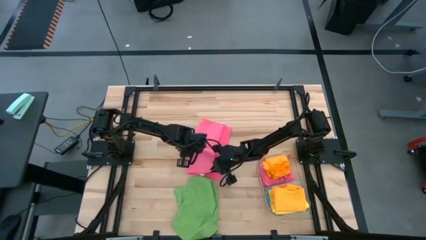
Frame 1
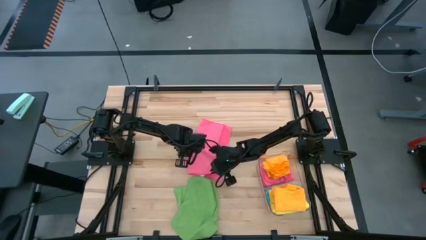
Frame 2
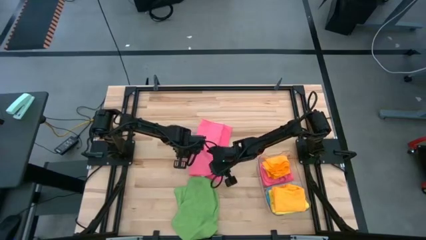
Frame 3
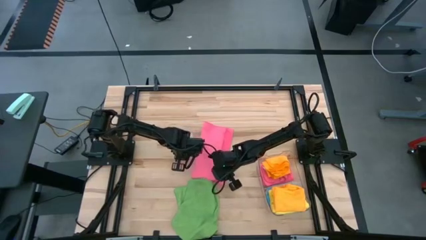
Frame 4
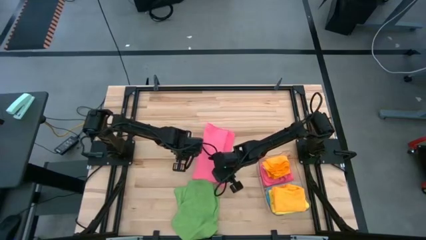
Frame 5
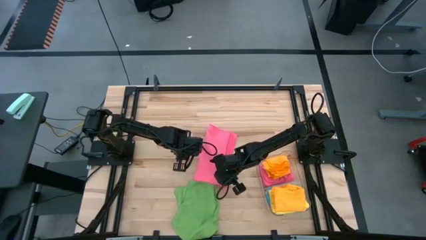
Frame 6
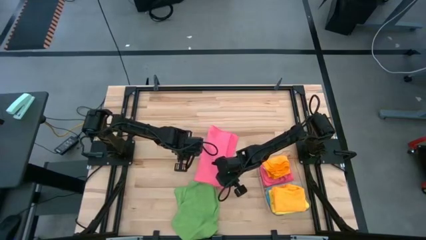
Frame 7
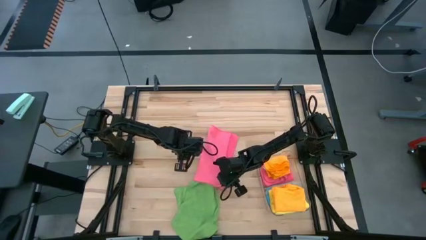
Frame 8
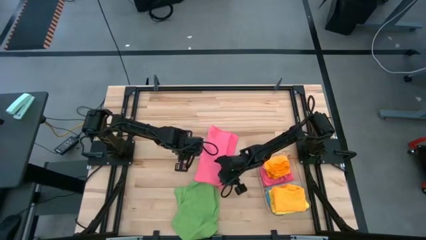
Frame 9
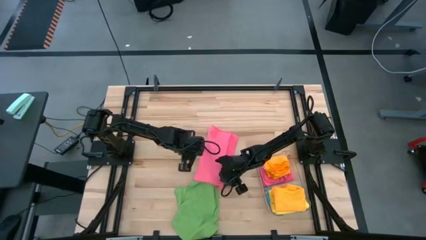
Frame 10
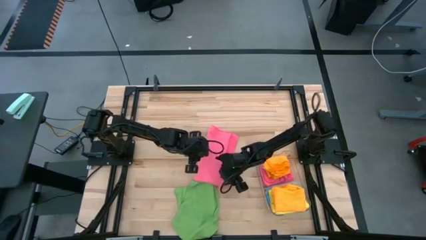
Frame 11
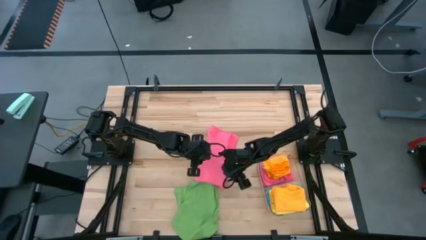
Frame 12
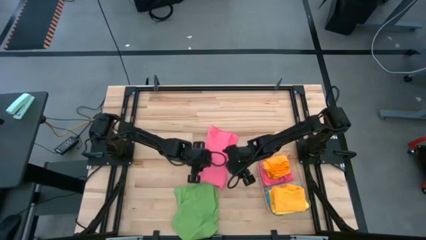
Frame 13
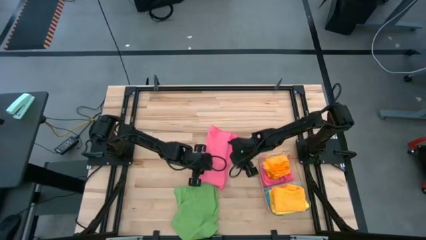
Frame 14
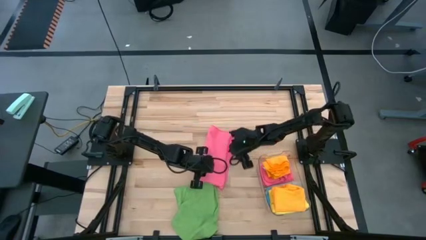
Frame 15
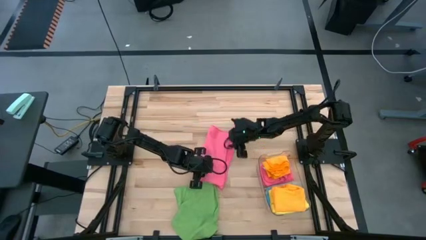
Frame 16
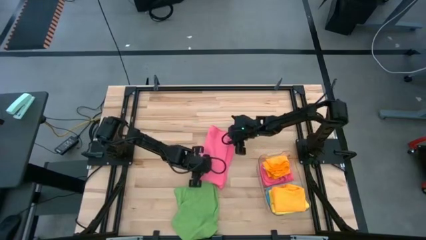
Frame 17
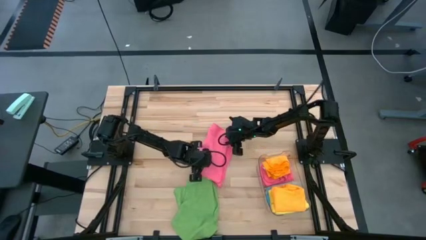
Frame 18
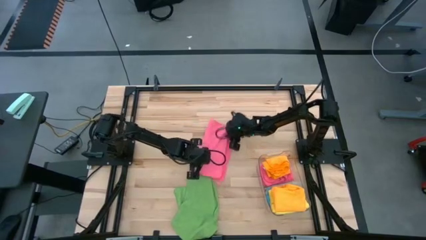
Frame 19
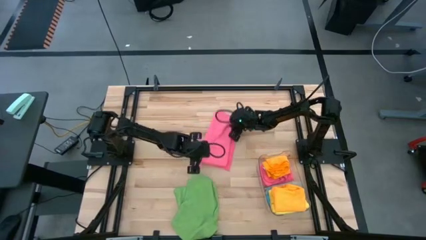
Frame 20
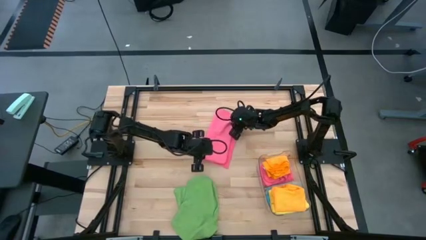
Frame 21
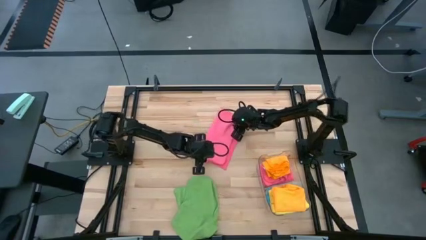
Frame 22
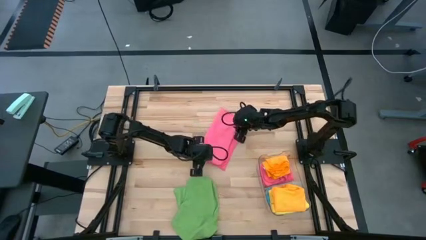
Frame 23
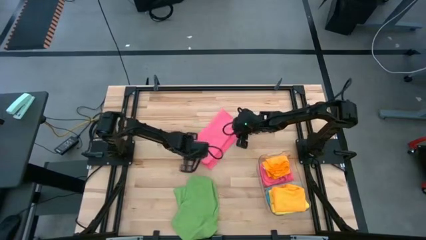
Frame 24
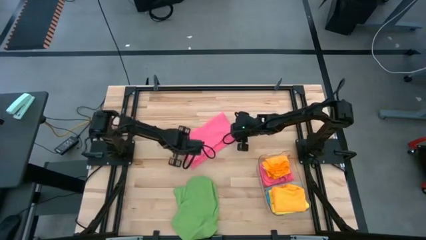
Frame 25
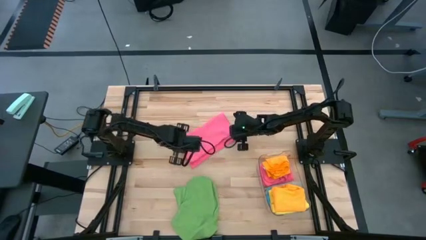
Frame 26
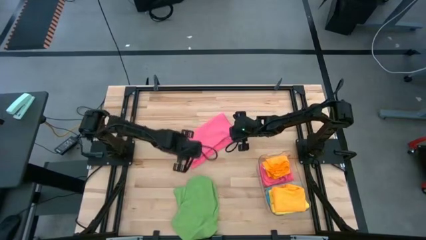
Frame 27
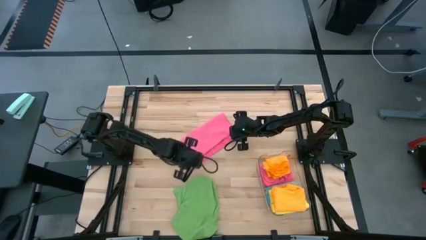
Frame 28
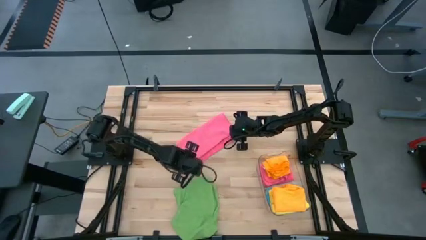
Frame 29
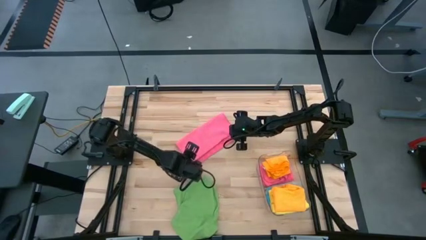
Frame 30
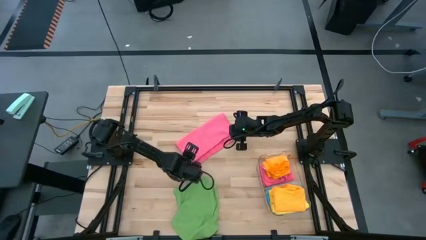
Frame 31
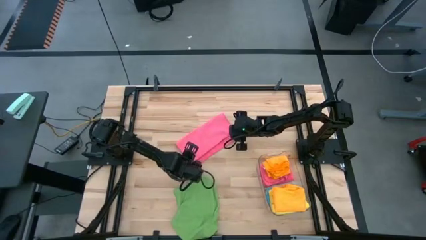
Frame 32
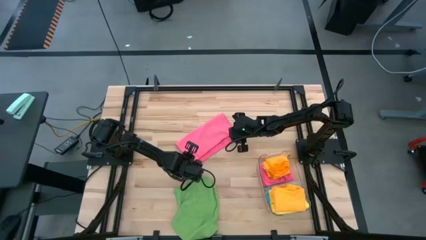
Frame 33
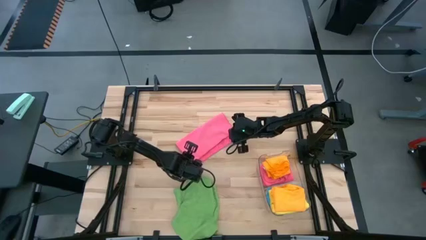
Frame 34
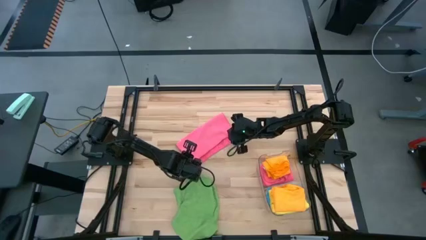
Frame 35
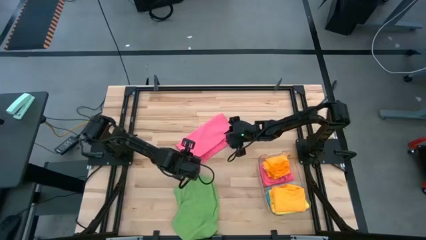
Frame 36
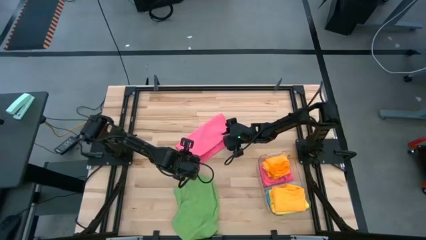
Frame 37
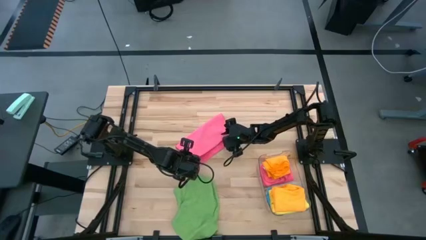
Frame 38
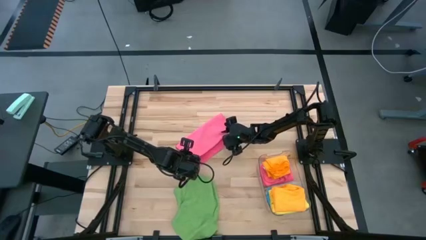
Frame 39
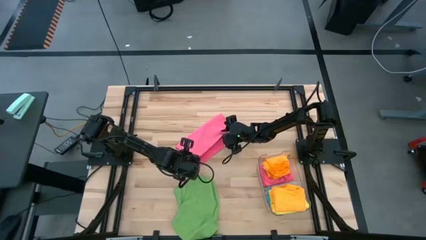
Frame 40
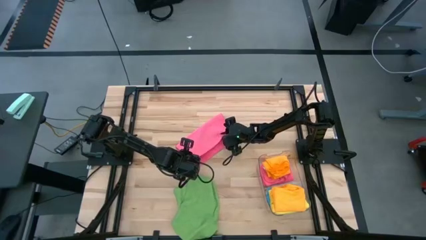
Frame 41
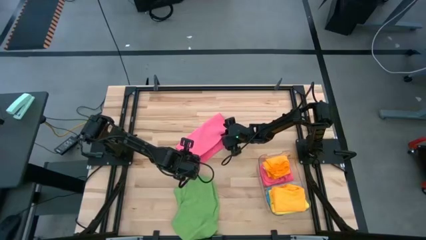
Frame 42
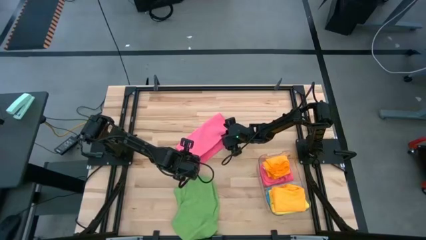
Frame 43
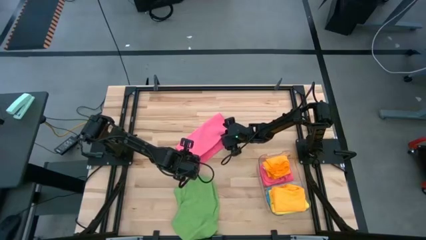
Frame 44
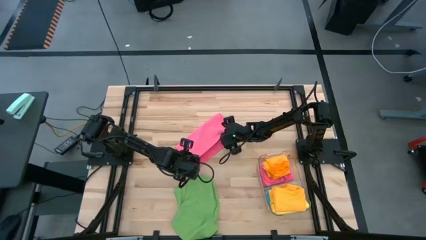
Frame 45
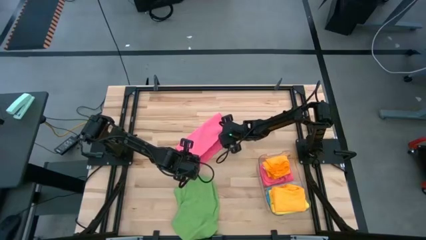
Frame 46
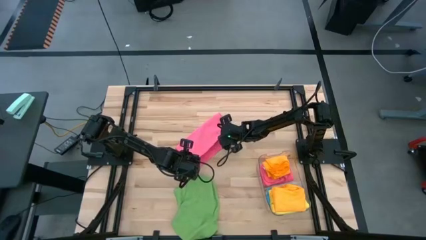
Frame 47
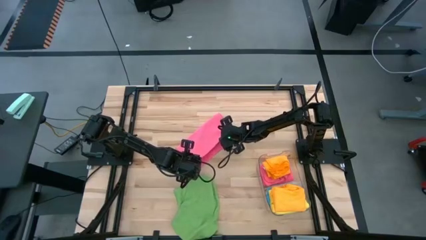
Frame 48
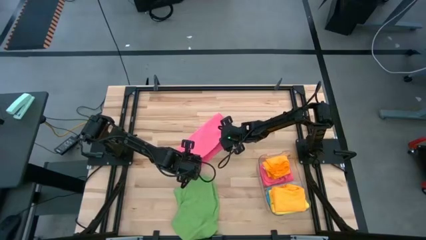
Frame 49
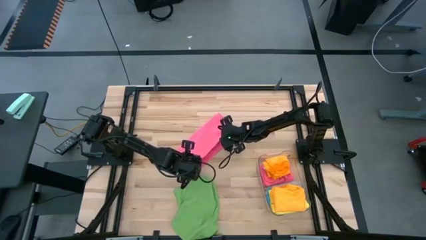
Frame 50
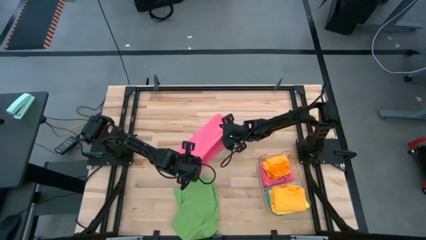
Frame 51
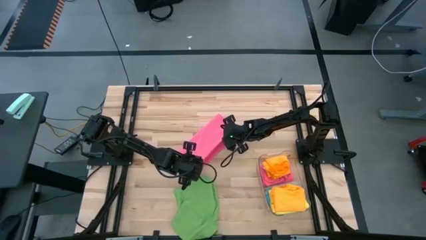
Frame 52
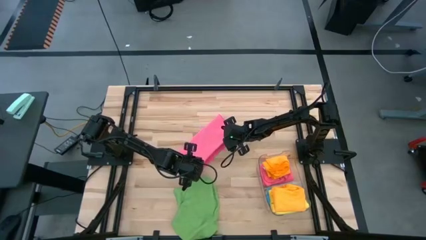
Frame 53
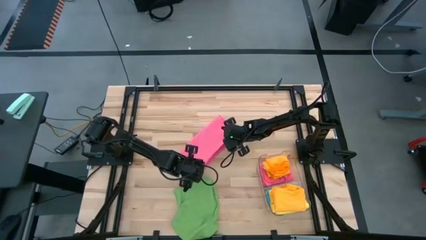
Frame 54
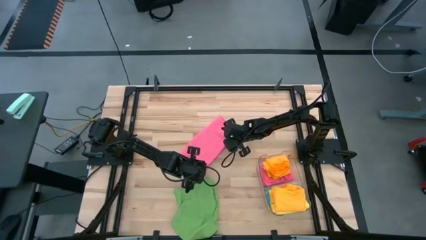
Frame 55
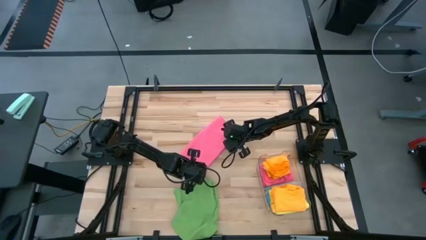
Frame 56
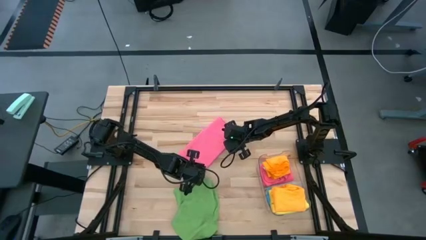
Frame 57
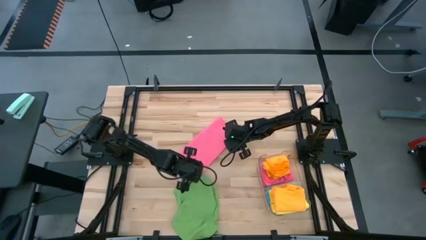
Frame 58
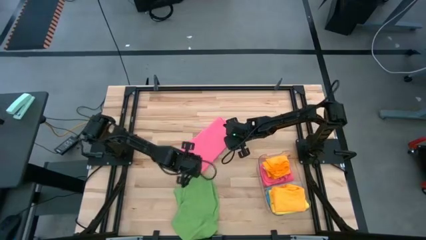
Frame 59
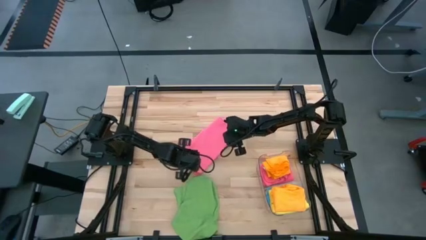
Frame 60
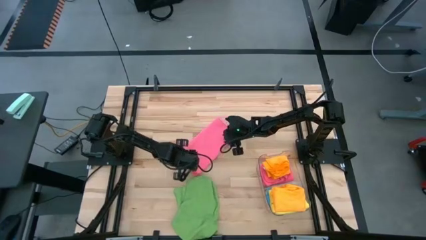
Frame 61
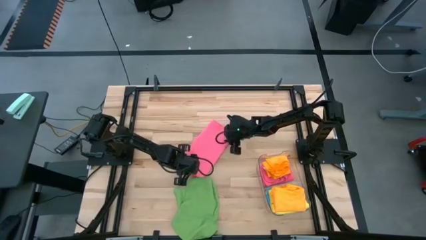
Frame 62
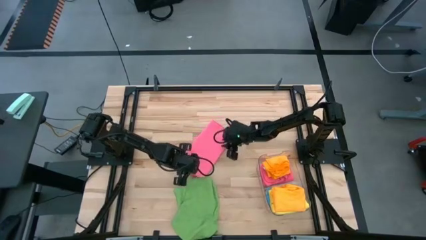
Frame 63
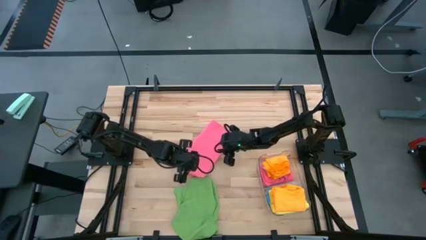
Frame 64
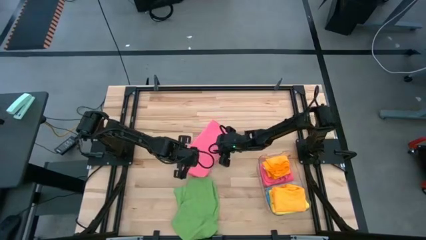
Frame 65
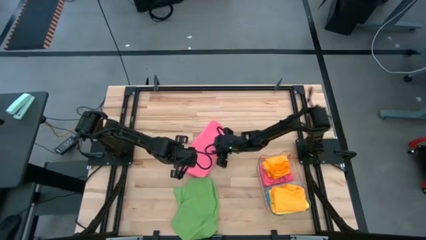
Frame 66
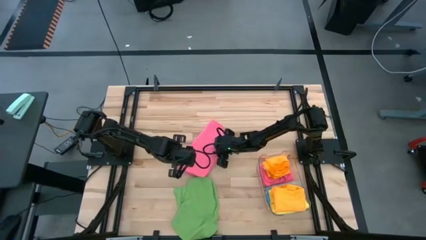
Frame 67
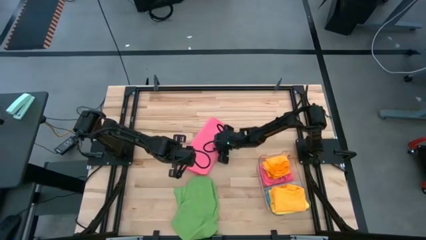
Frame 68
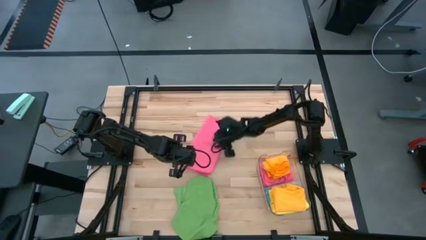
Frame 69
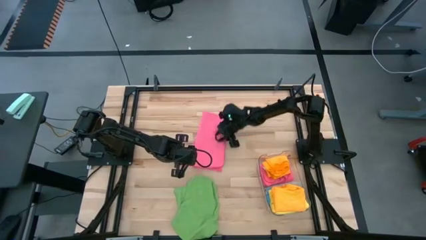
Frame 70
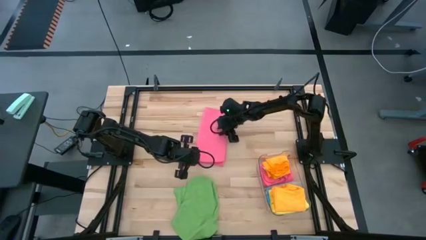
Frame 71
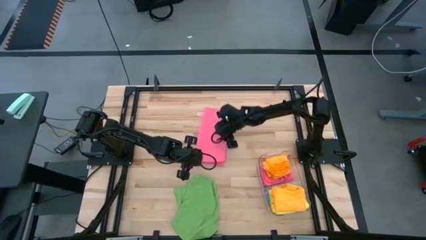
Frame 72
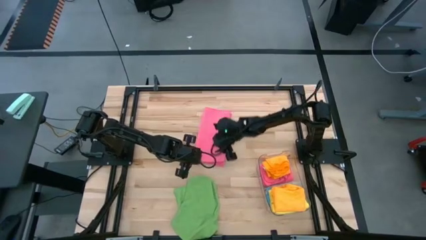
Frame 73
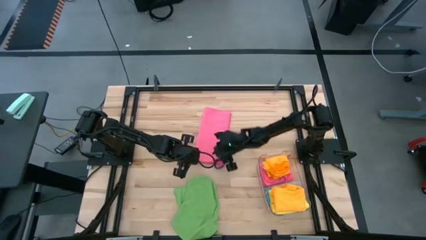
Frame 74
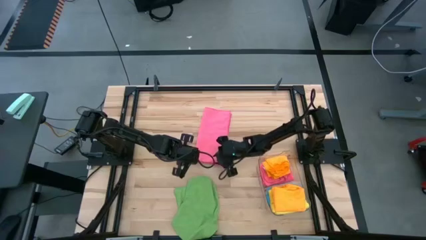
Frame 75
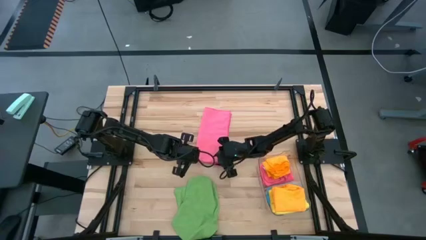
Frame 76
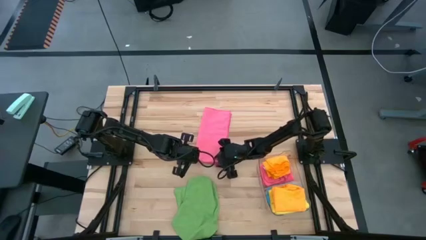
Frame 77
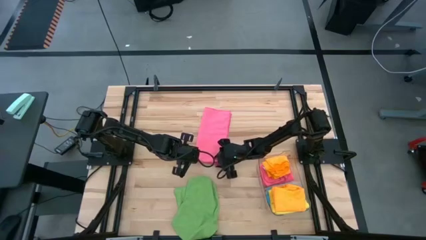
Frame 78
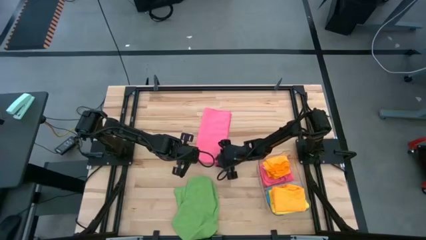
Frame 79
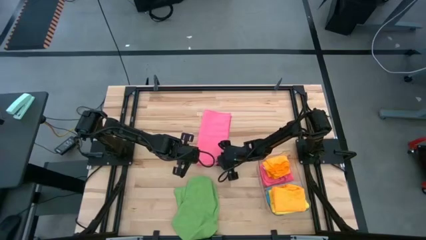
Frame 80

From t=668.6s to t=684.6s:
Task: Fold microfiber towels
Fold the pink towel
